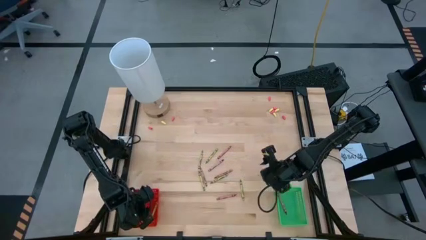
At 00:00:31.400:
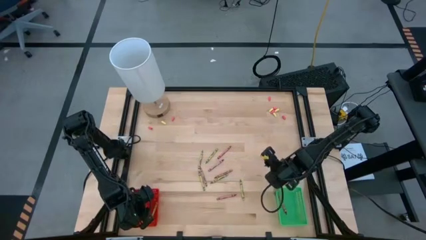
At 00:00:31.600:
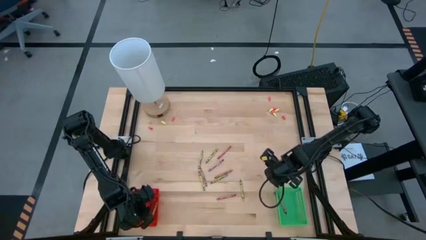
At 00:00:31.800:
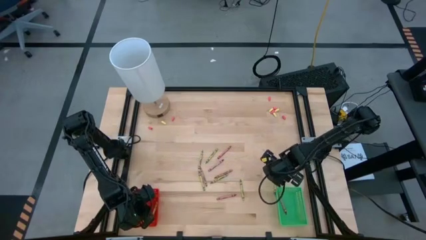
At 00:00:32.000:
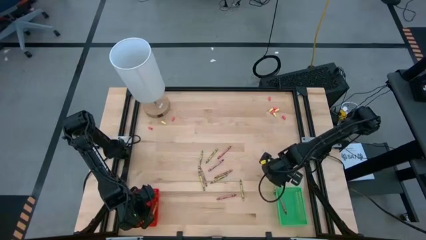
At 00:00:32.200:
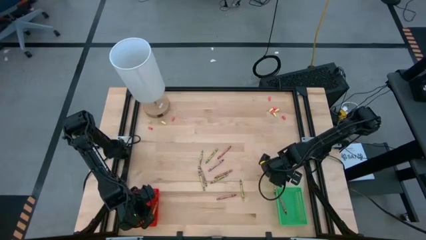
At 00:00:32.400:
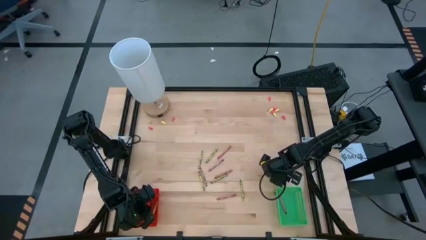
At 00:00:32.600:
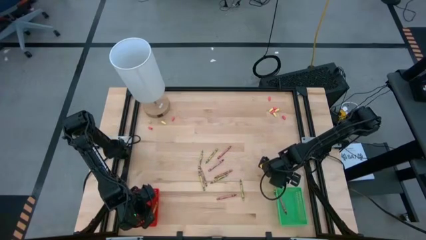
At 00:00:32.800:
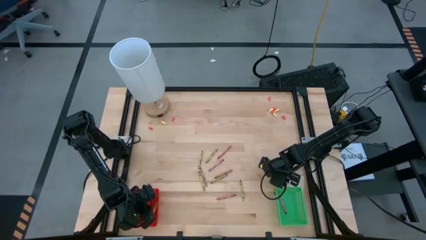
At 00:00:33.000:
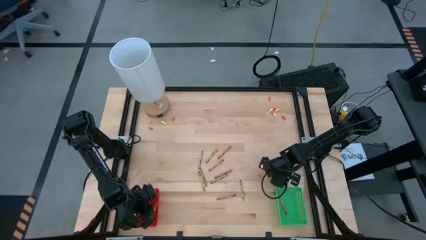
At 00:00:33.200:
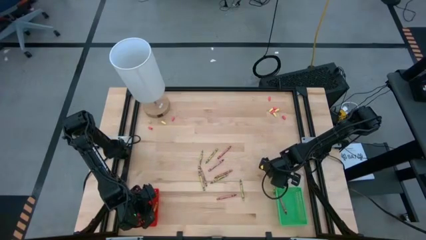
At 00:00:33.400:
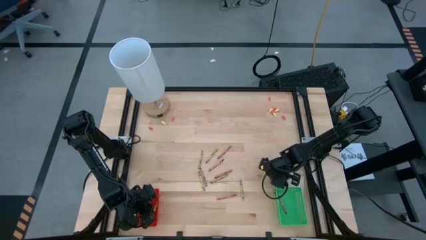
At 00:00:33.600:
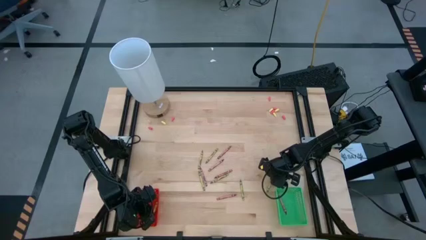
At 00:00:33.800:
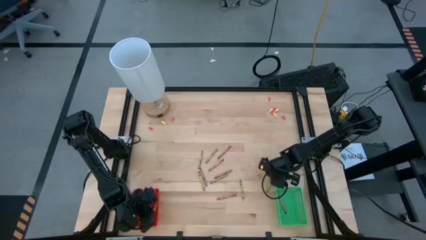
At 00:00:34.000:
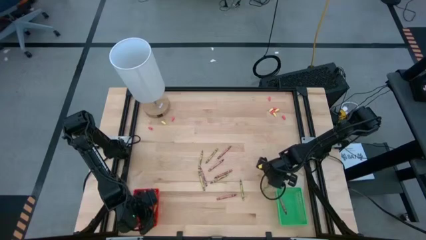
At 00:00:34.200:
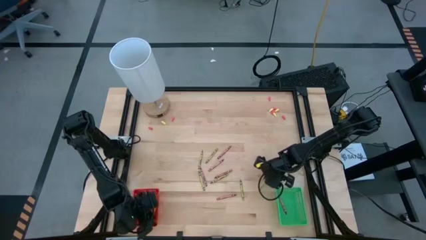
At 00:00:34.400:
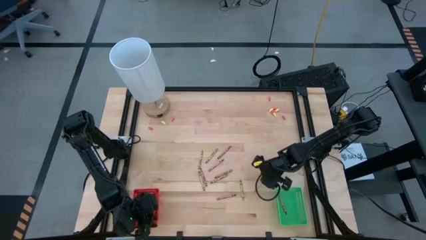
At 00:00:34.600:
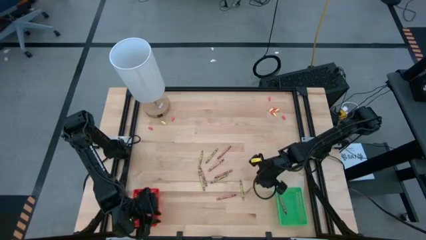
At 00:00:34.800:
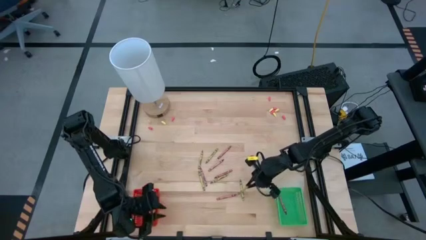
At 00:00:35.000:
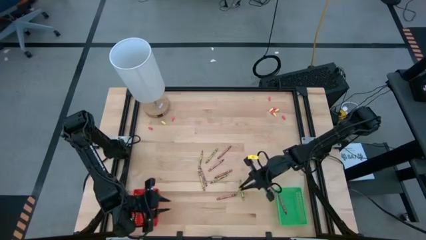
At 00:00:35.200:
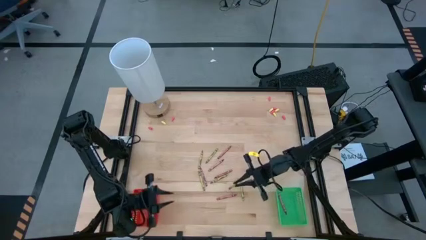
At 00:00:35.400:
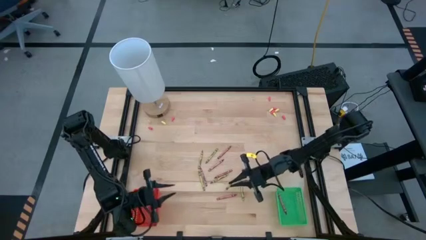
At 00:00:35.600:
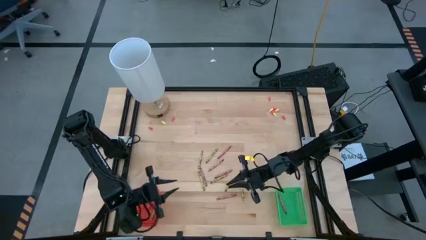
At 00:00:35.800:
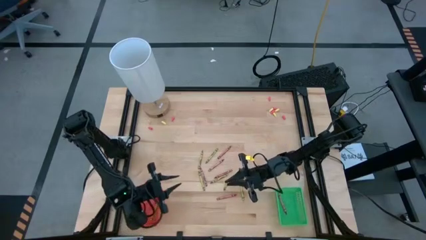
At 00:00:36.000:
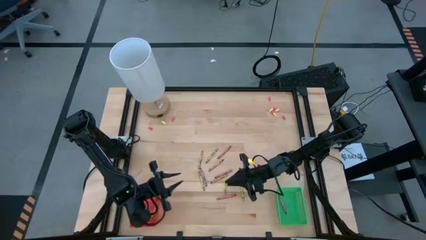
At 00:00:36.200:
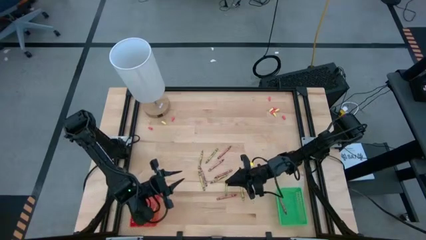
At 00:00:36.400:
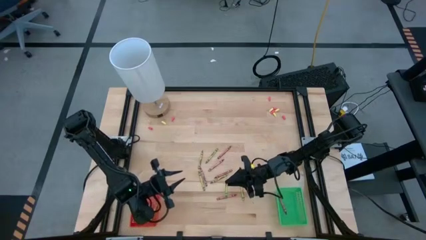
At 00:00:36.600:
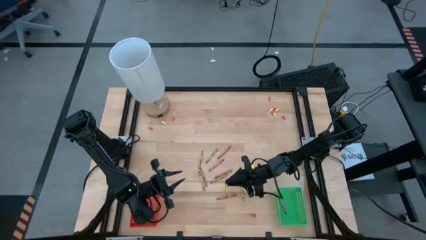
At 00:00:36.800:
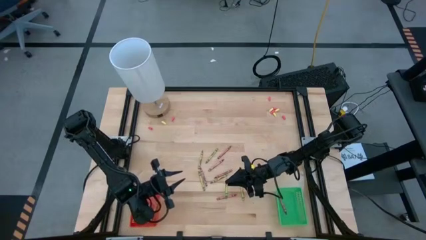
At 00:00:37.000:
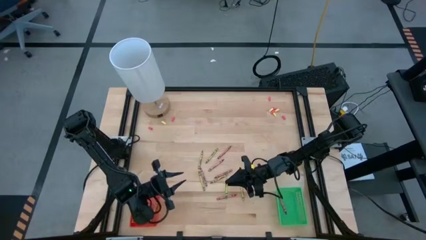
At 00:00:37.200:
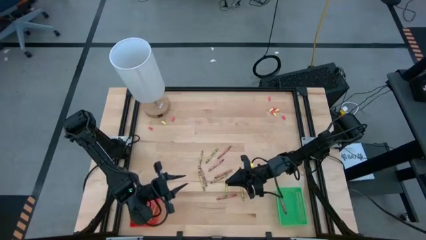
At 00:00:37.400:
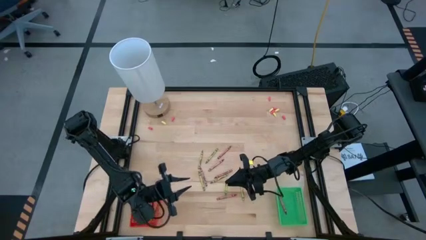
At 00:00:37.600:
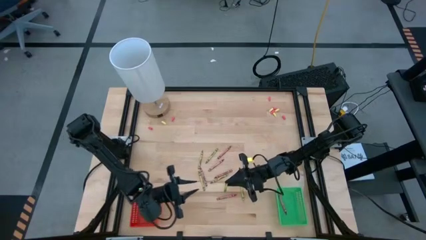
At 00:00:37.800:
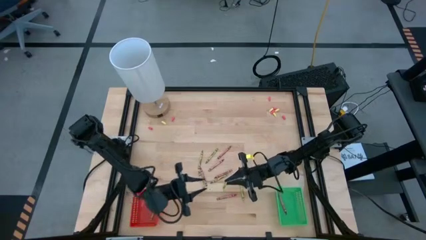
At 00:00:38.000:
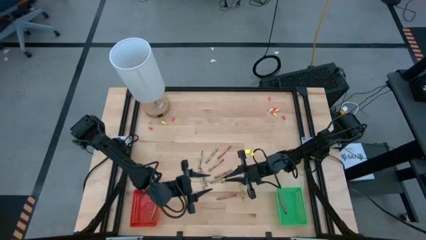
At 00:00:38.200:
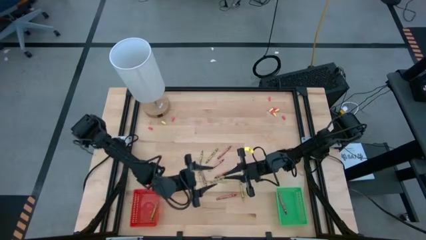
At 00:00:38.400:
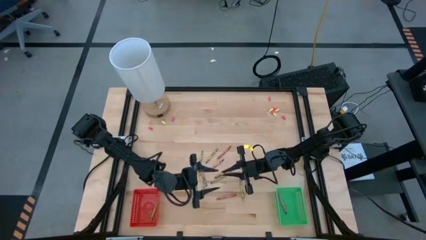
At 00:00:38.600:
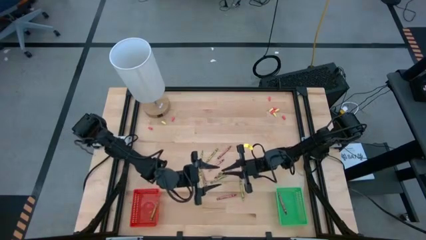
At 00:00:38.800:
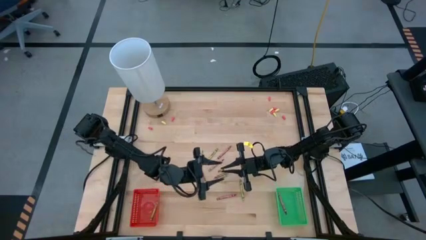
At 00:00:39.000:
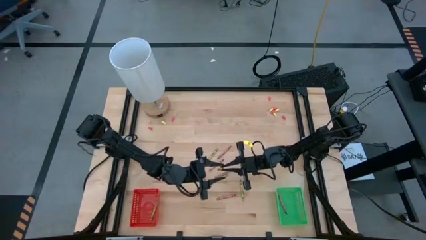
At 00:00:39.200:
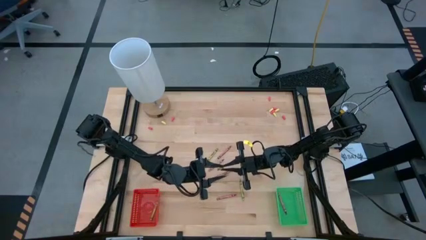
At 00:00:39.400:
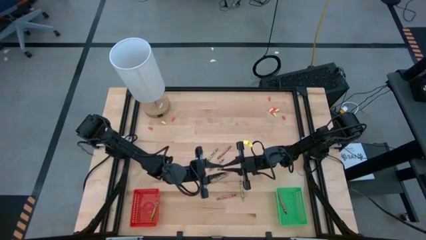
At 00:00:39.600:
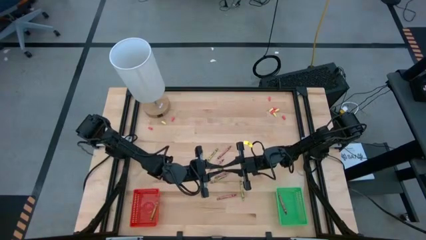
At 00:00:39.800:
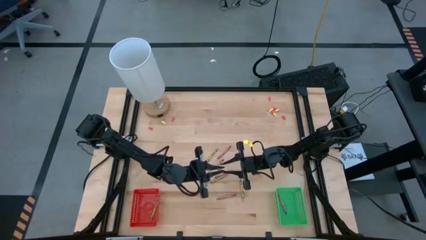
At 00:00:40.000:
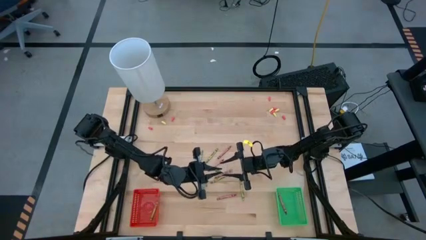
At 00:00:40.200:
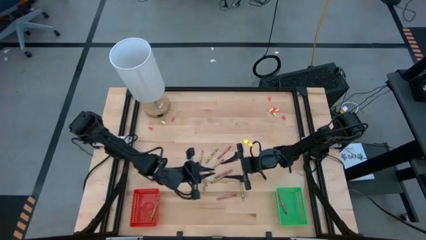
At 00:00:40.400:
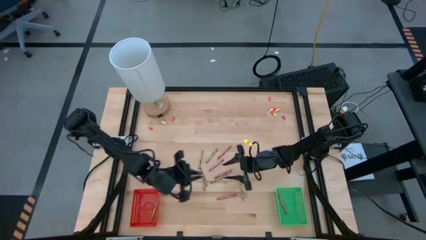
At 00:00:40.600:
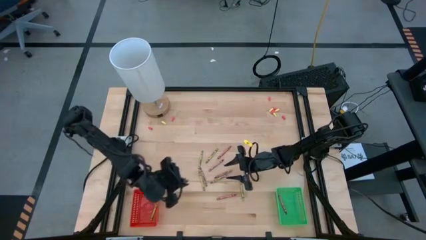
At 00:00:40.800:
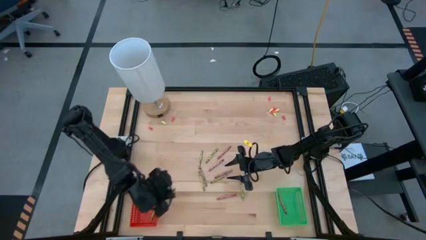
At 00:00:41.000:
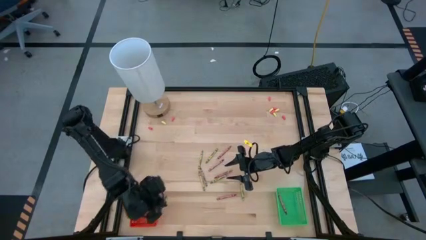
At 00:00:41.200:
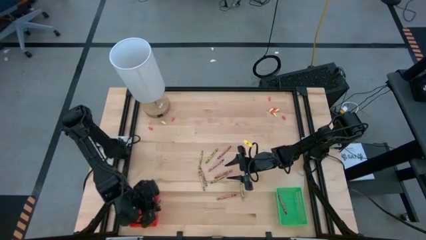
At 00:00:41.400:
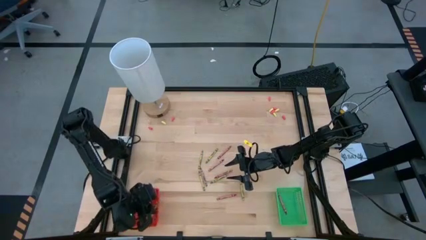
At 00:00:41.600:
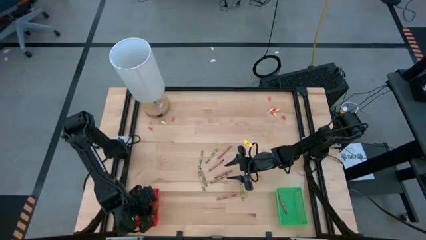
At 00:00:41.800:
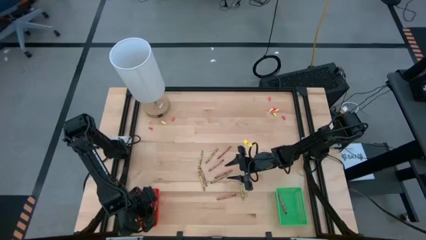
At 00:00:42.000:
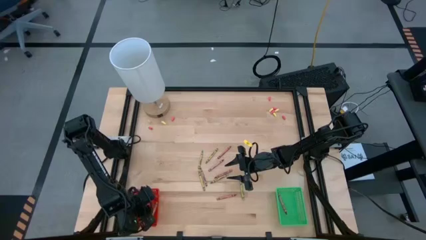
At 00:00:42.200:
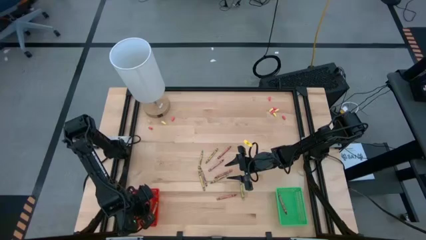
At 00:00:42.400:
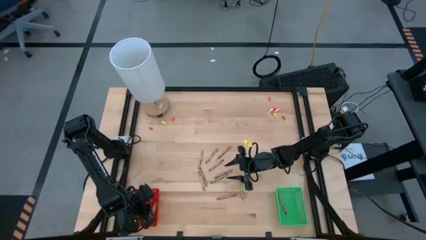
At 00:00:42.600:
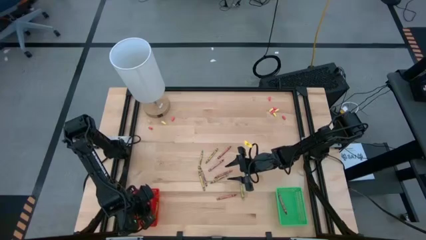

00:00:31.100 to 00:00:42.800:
Task: Sort crayons
Put the green crayon into the red bin

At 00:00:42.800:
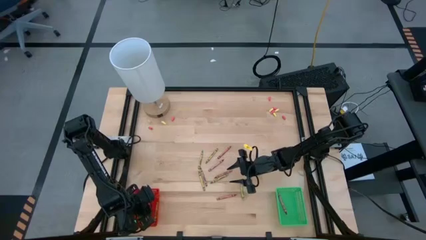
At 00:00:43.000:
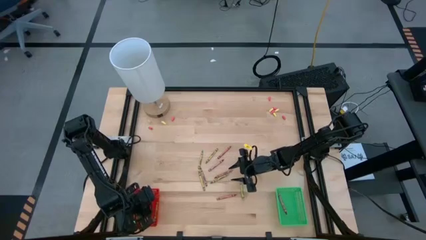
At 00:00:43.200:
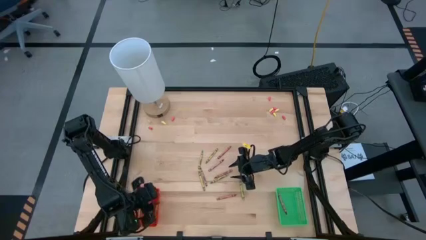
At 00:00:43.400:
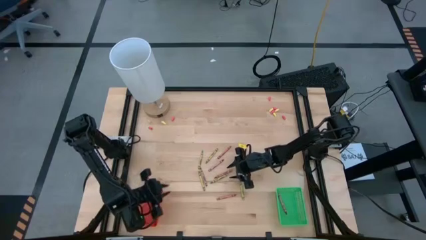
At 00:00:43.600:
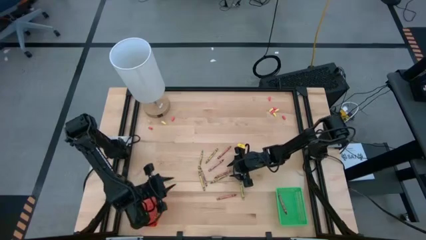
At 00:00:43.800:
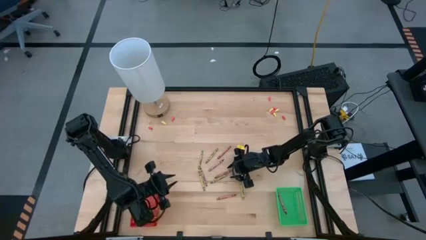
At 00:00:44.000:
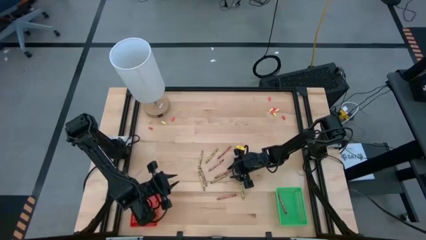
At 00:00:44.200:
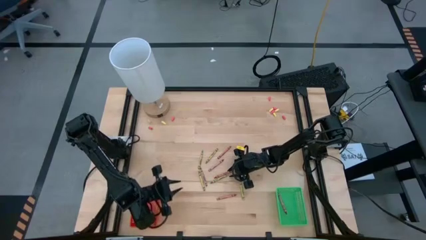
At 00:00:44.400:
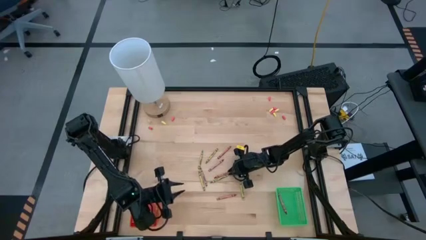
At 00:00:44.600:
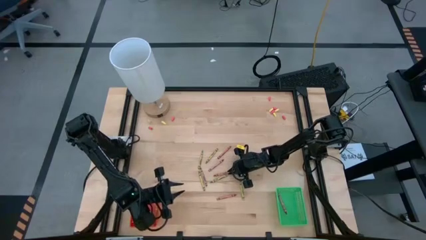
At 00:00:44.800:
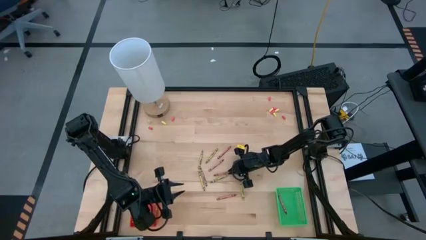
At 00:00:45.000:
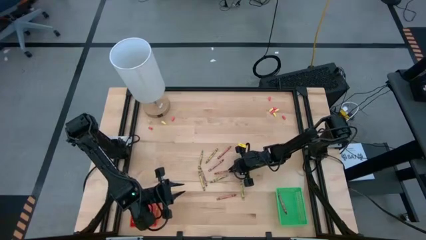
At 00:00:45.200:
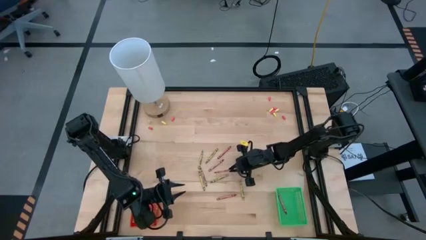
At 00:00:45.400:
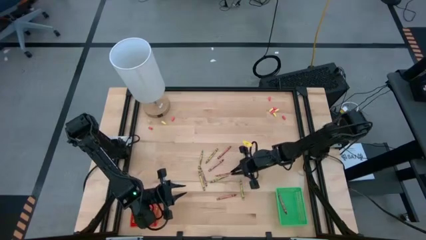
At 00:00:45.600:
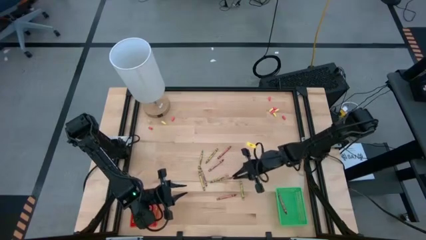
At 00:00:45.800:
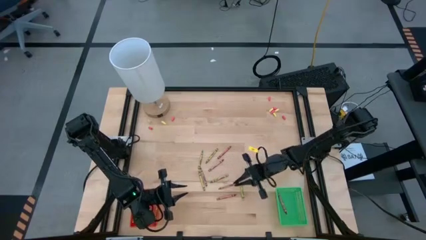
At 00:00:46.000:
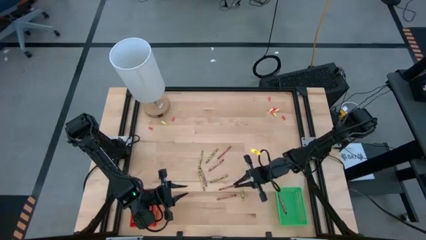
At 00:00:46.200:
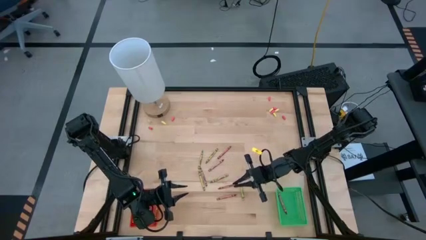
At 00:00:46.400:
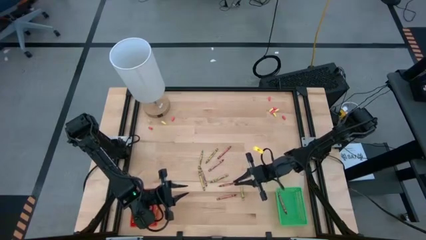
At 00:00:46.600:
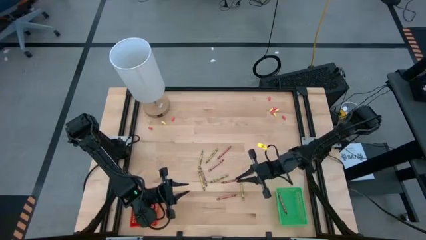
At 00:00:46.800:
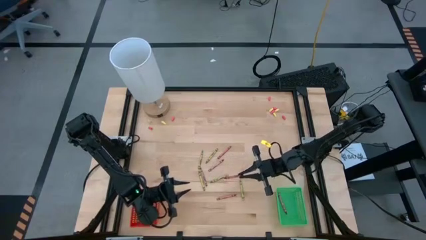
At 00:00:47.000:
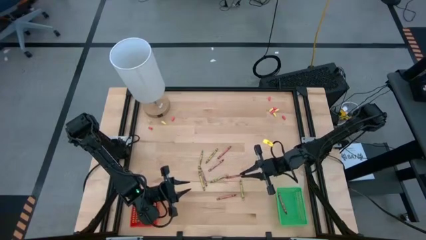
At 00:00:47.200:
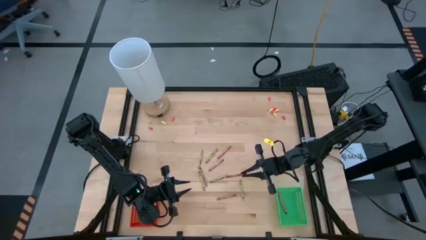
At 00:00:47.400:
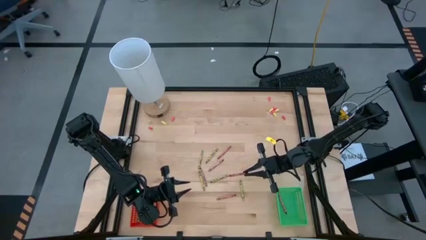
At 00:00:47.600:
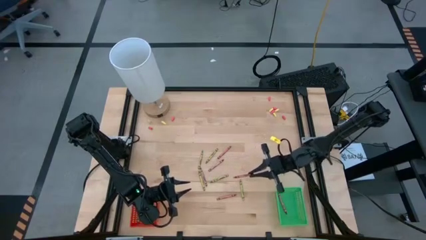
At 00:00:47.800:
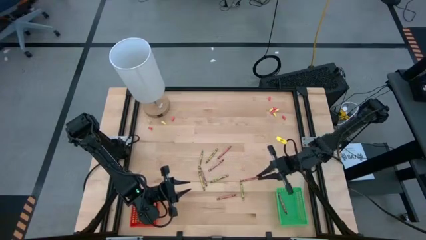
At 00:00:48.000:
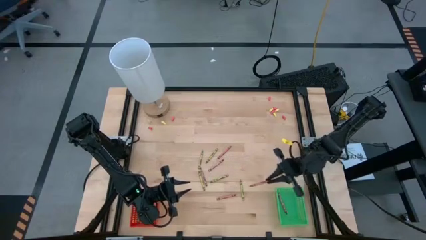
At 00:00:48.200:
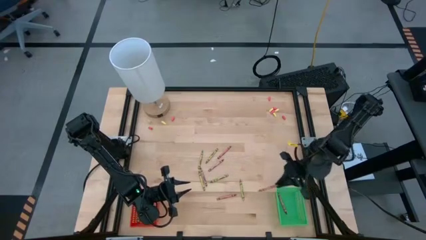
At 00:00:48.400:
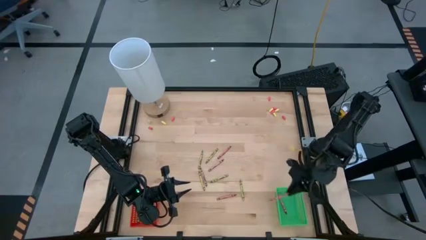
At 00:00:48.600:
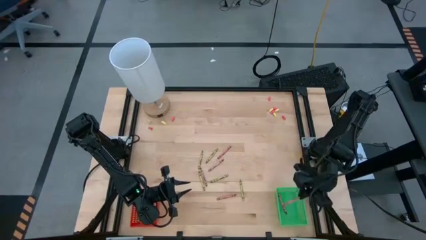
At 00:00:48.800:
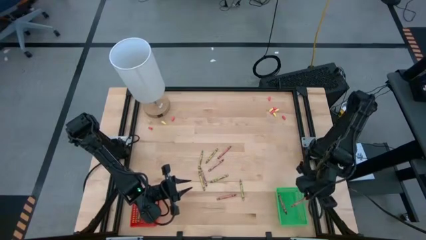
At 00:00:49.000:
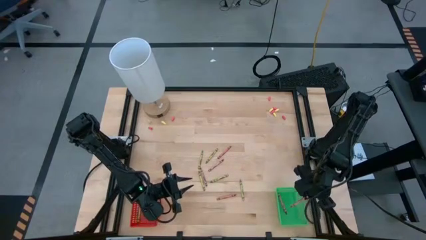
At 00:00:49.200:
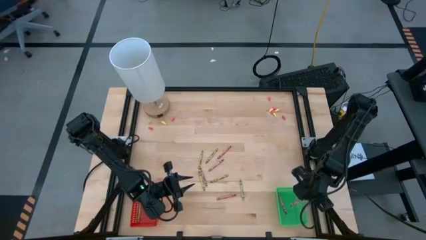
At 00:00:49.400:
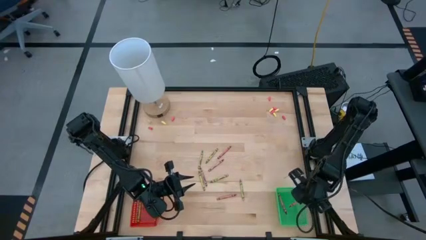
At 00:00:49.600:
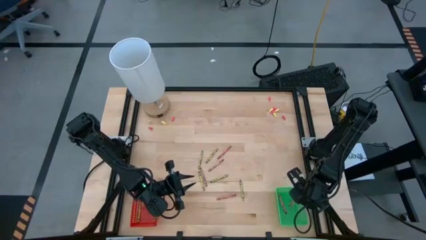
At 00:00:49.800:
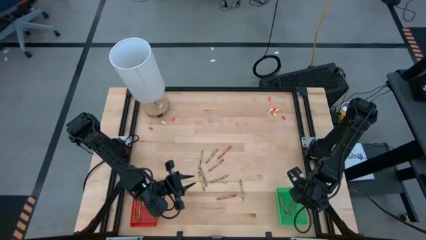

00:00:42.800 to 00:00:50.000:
Put the red crayon into the green bin
